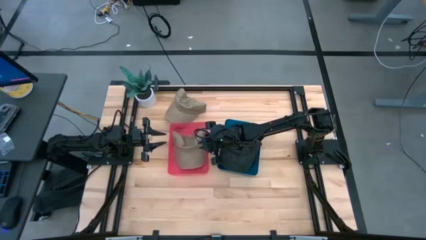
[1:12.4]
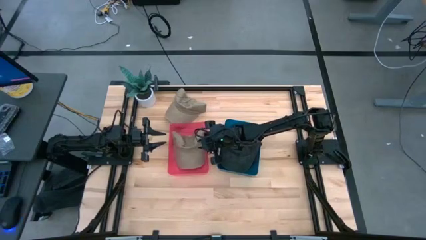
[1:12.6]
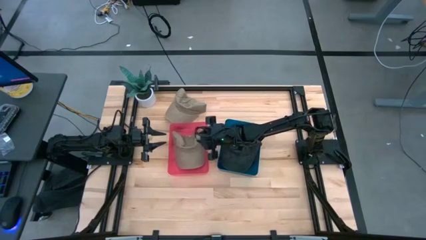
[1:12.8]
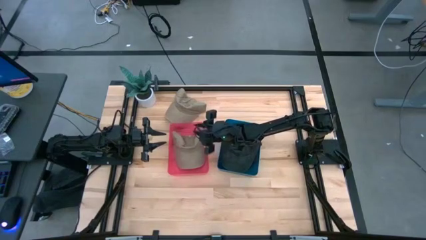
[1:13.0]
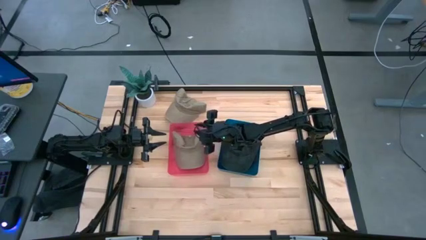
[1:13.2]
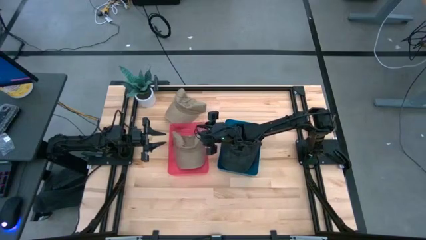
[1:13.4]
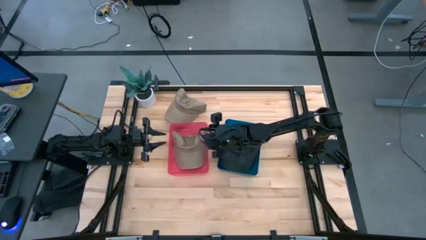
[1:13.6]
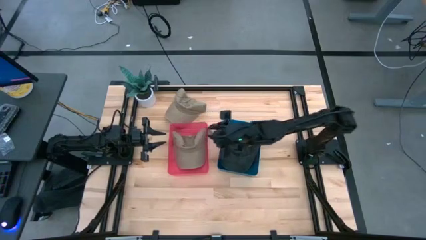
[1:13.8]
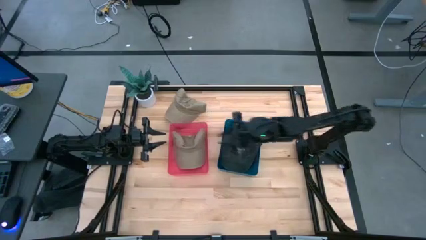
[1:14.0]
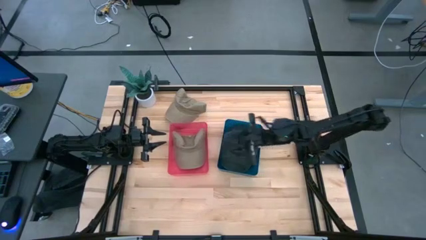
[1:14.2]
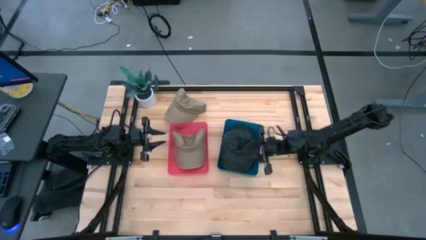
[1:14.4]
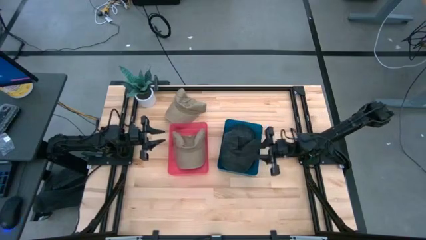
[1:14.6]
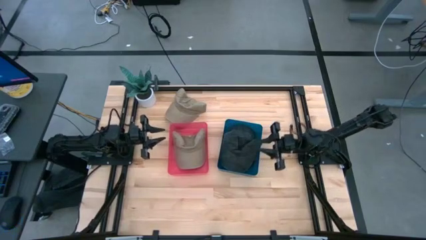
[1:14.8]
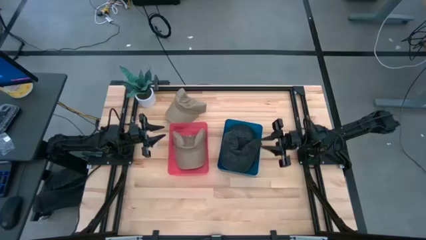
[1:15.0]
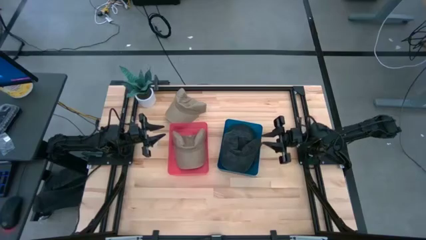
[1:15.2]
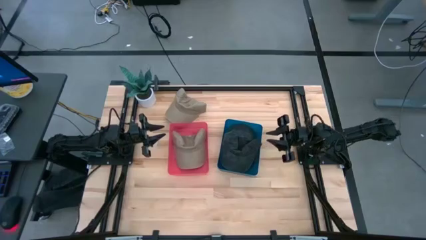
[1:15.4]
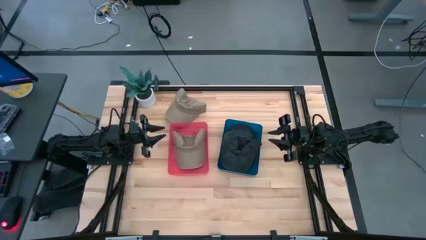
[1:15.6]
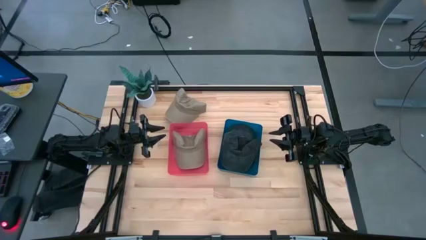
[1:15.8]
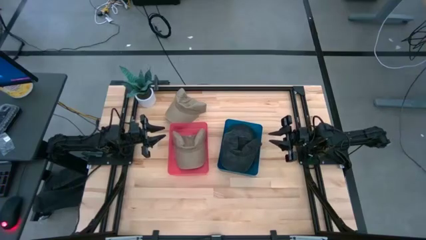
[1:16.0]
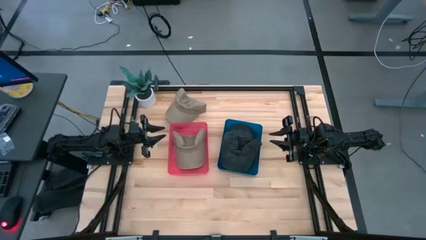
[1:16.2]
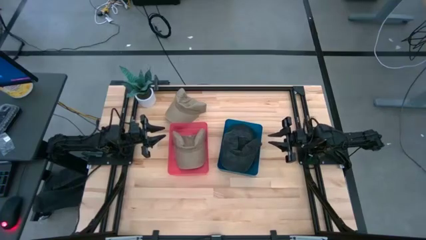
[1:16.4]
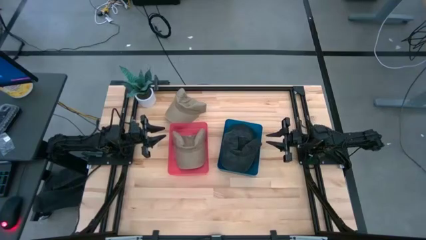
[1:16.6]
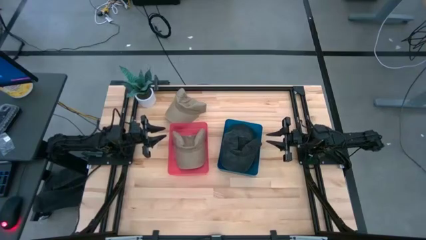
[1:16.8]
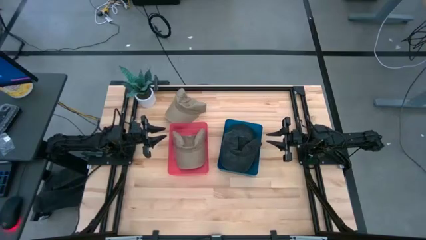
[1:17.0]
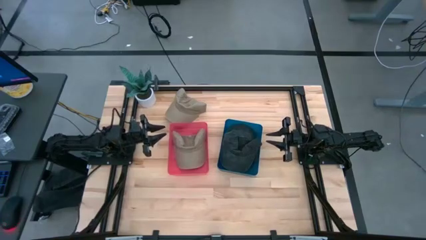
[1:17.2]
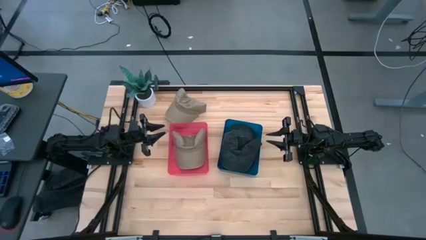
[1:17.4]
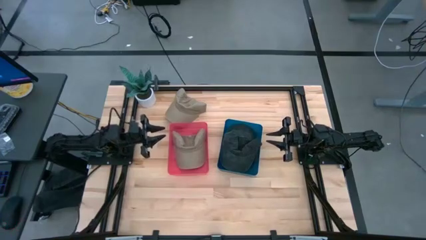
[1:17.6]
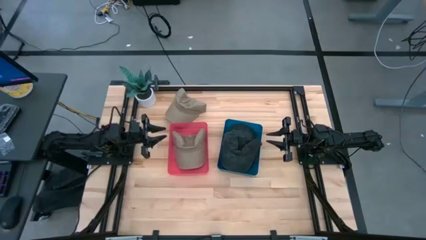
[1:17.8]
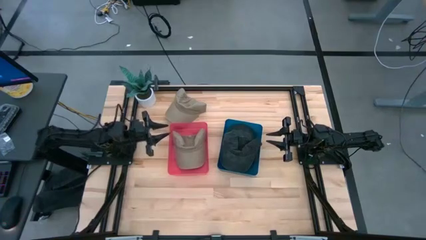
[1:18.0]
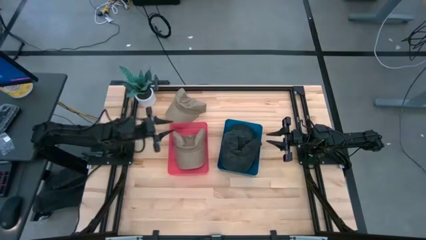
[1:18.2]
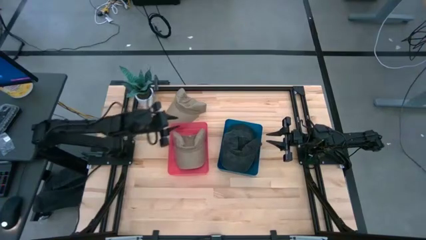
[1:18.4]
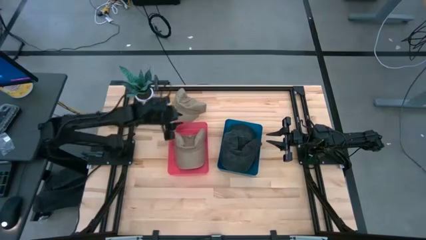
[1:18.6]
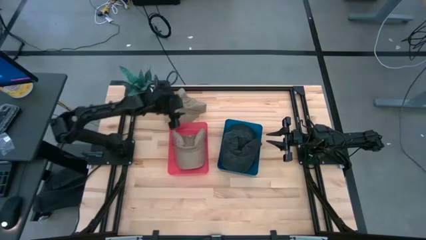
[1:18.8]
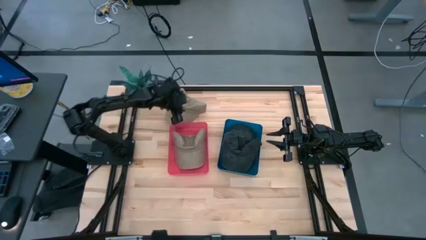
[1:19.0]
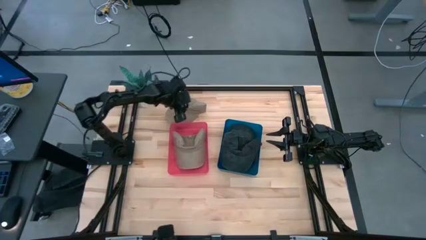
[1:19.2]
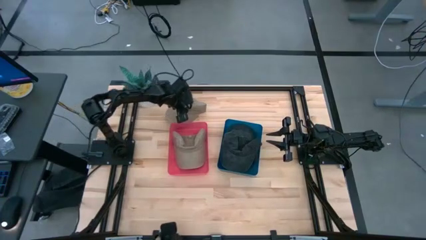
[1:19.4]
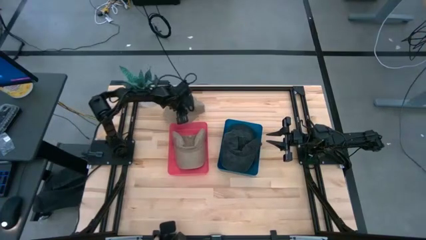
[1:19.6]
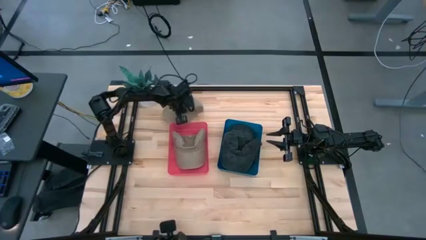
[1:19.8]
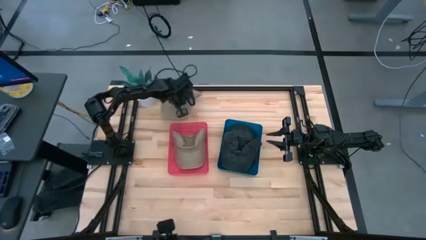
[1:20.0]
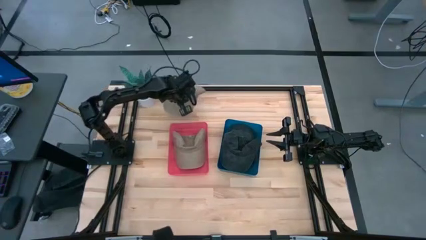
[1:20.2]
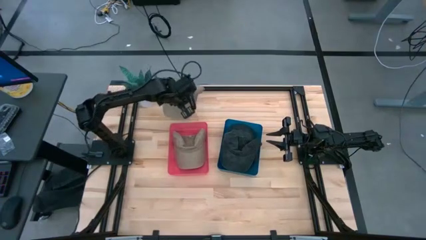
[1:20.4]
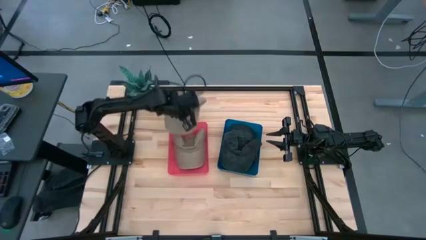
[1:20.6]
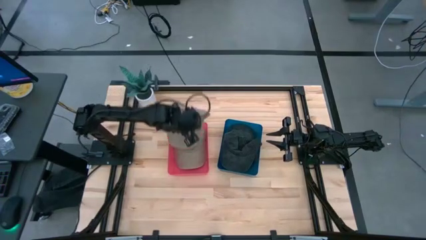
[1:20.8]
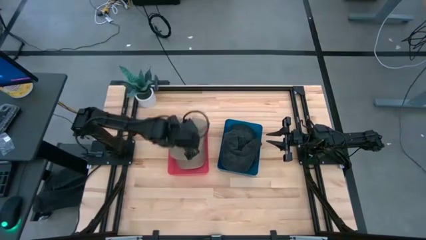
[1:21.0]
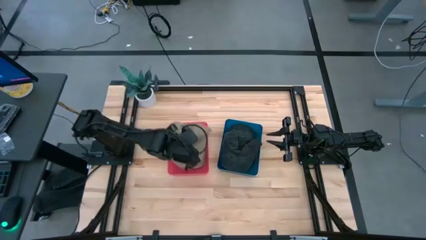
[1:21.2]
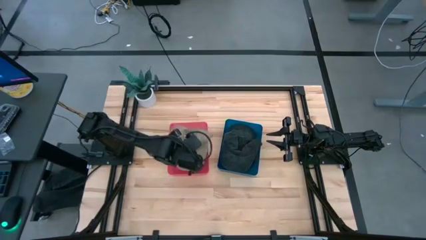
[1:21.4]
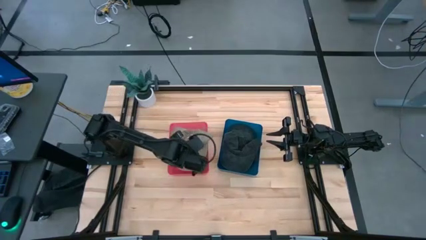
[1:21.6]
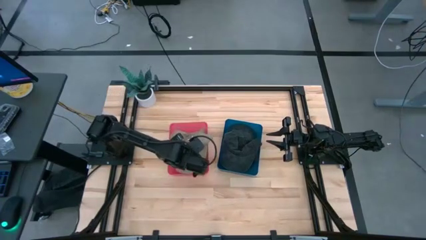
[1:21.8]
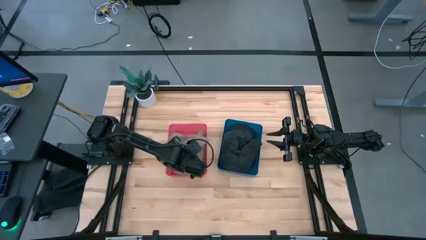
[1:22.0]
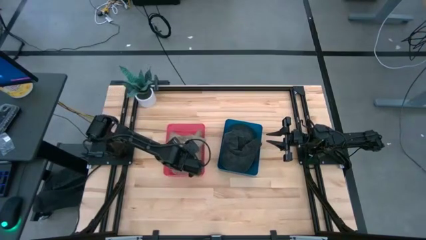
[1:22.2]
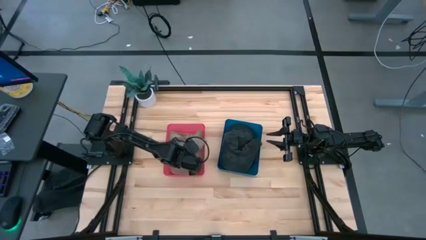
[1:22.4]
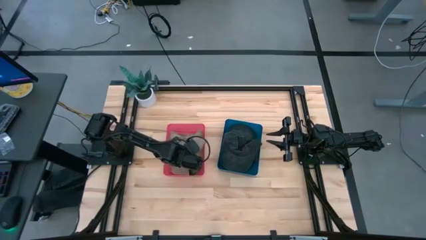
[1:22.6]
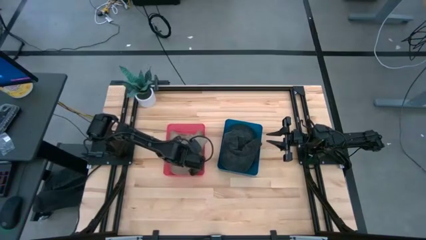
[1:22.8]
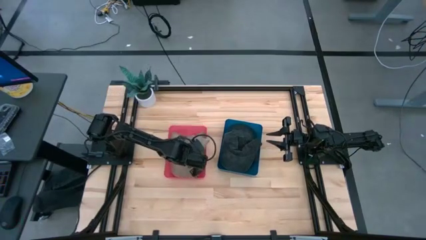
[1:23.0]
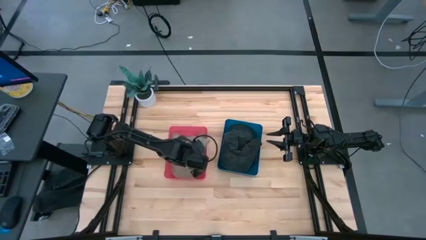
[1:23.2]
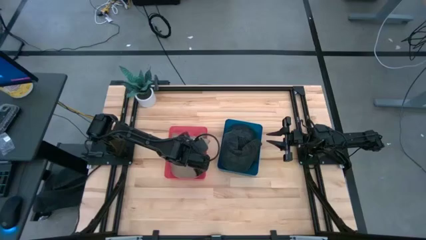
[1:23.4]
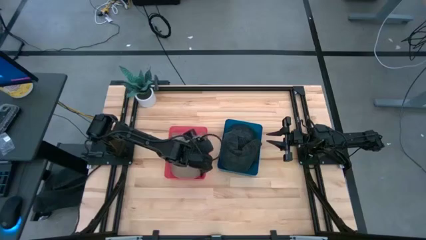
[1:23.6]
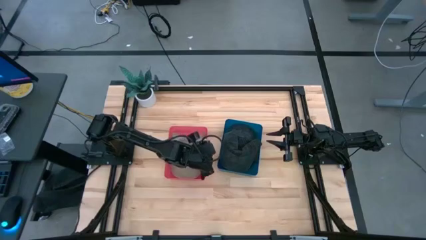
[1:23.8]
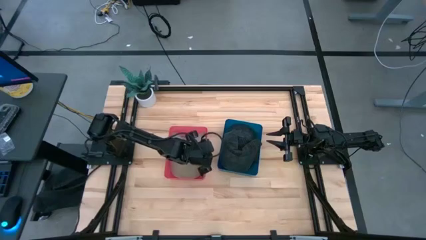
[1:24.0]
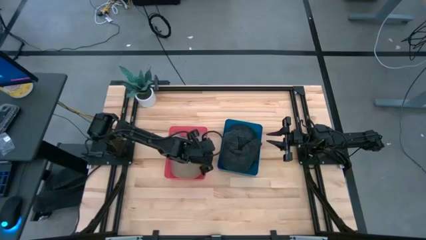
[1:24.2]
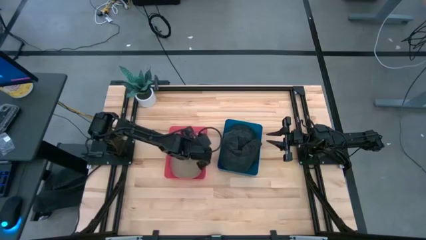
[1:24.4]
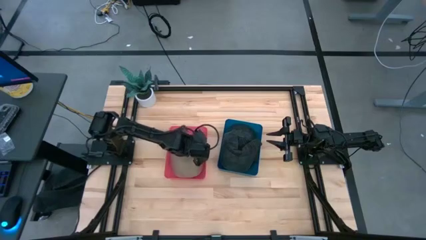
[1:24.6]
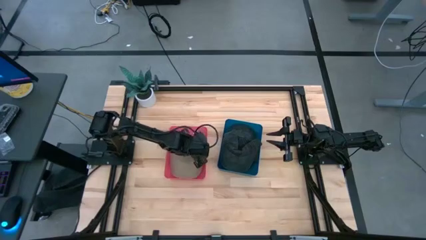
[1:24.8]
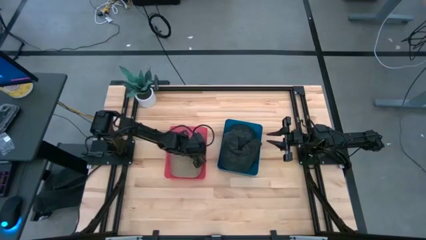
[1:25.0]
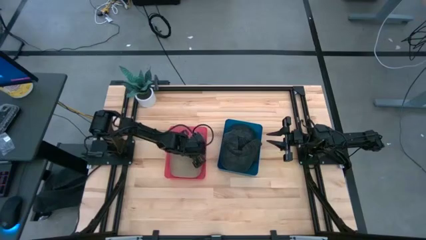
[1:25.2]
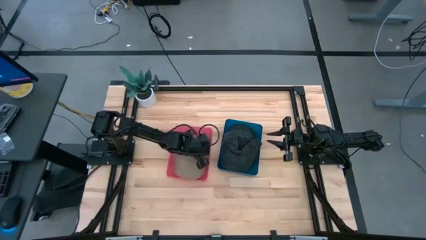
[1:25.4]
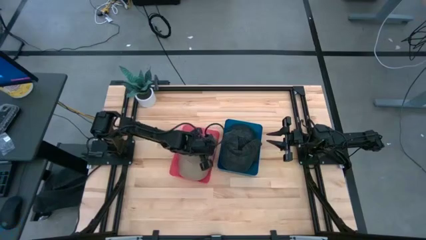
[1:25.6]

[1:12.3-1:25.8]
Task: Pick & Place hat
Put the brown cap into the red bin

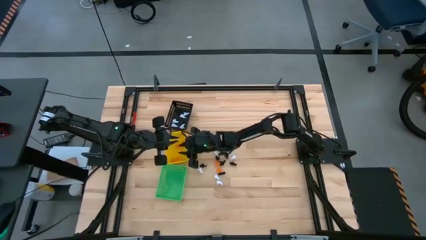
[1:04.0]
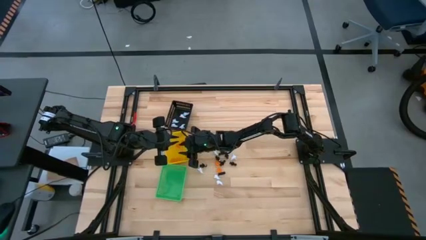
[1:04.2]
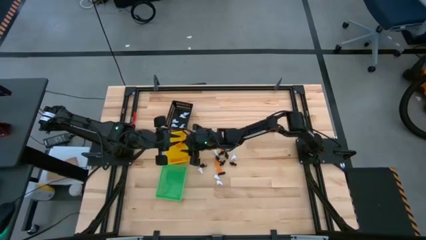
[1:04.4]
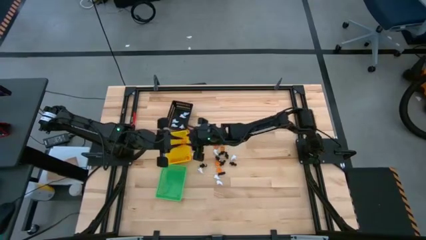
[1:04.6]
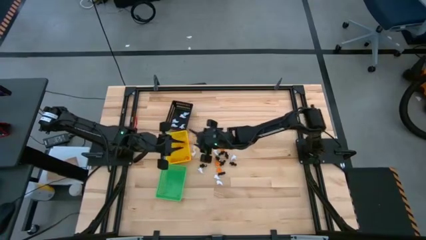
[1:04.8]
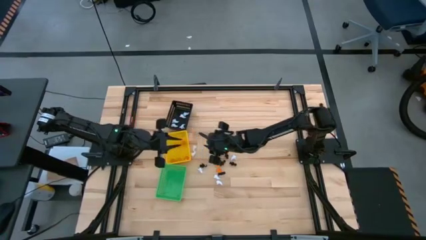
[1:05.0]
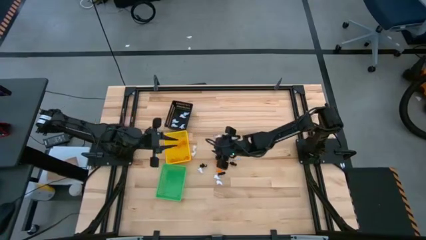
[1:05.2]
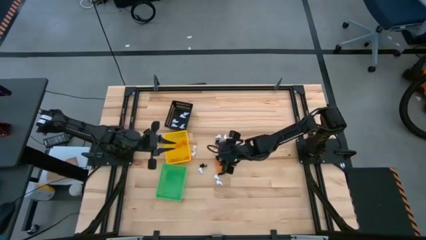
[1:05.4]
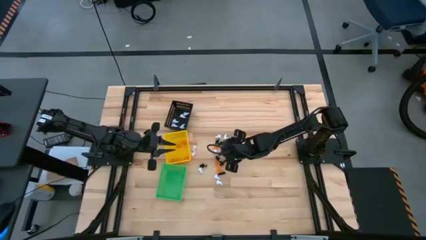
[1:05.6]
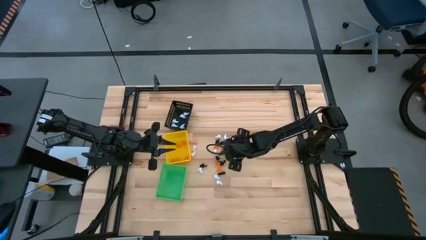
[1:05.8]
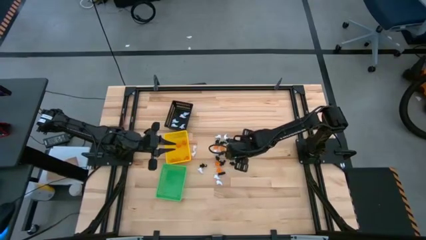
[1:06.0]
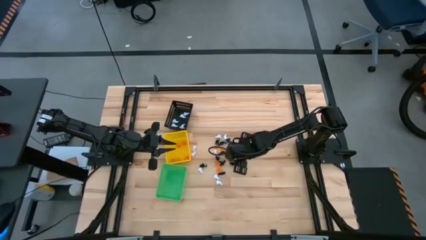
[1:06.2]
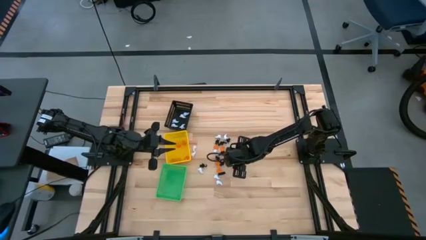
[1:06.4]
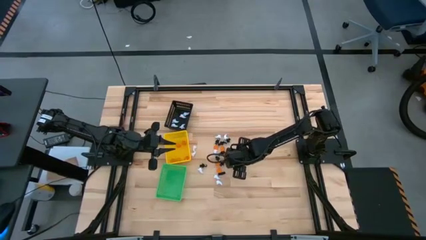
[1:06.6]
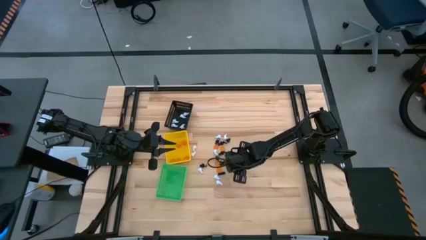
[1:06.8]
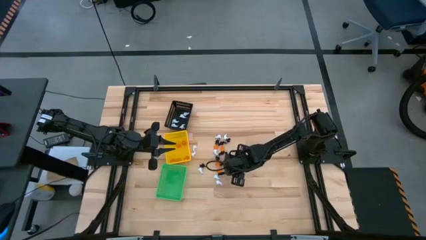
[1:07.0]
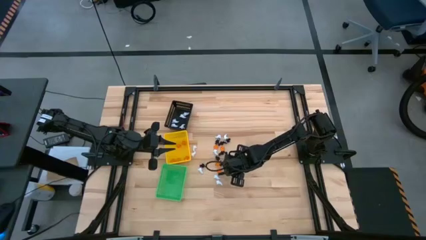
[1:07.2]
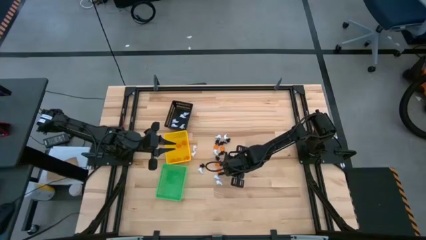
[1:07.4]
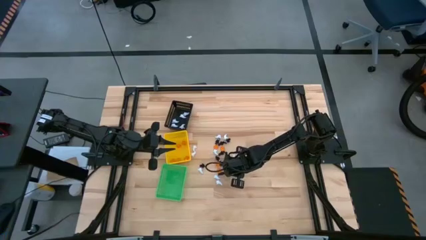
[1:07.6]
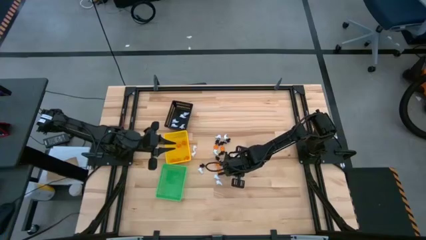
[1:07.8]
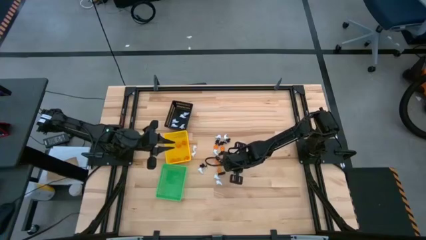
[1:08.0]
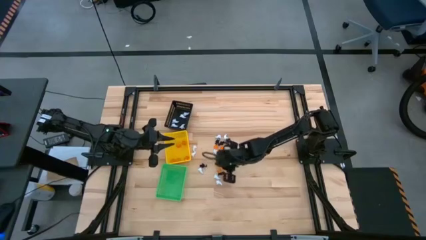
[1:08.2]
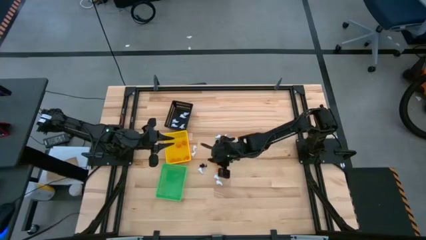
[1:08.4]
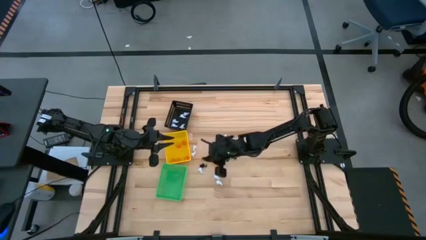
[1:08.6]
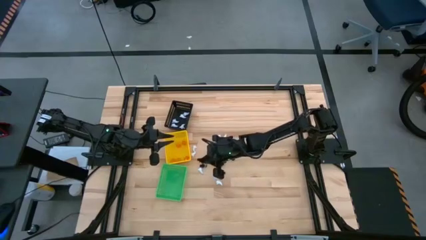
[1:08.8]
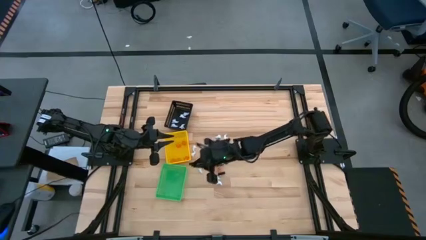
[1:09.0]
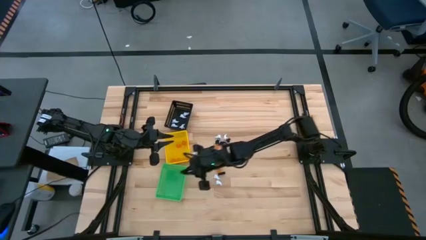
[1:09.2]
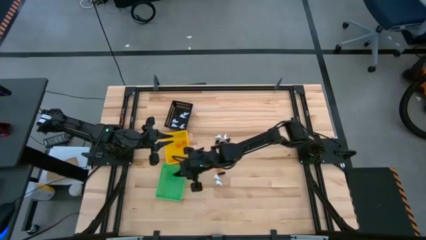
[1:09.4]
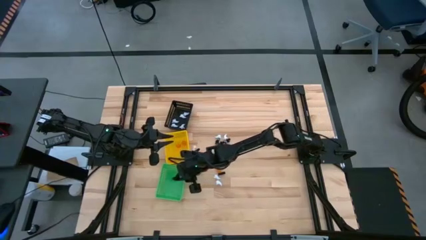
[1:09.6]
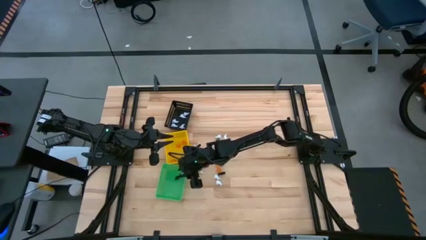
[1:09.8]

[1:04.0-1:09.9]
Task: Sort Halloween decoration
Put the black skeleton toy into the green basket
